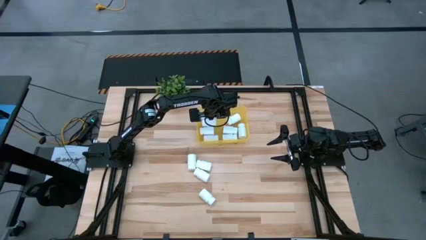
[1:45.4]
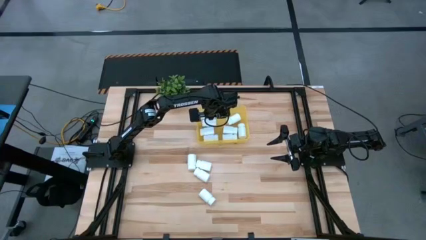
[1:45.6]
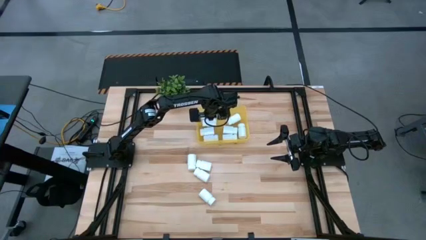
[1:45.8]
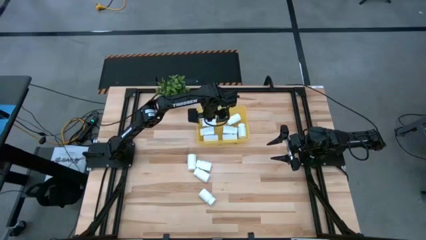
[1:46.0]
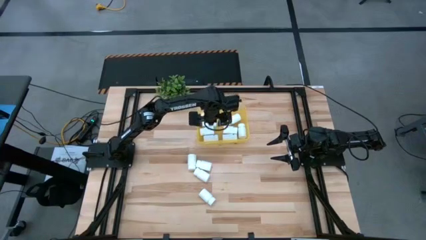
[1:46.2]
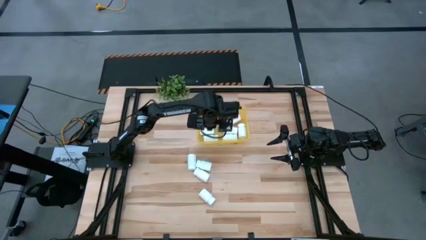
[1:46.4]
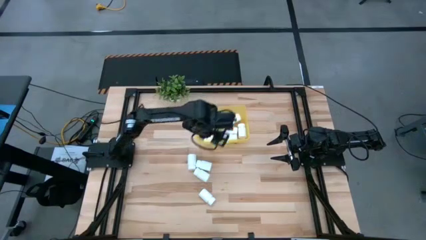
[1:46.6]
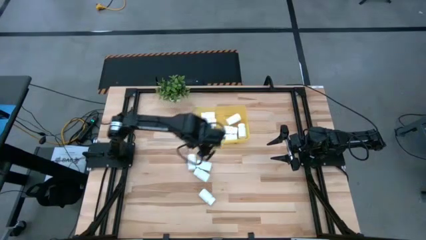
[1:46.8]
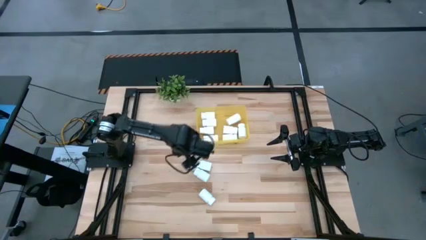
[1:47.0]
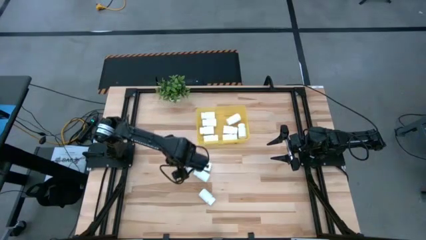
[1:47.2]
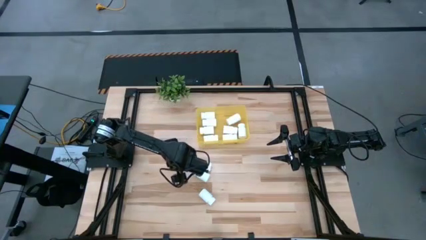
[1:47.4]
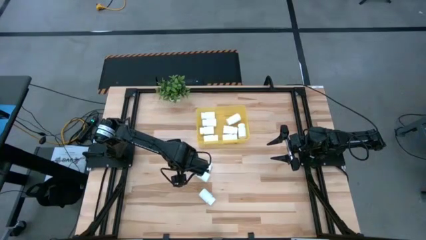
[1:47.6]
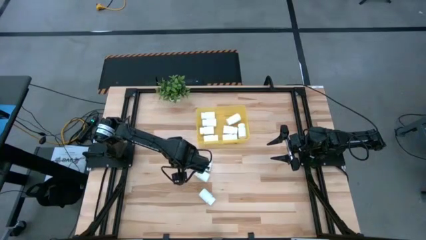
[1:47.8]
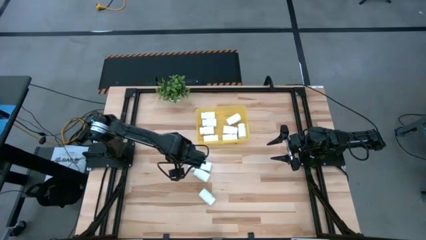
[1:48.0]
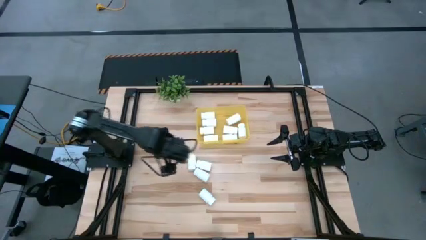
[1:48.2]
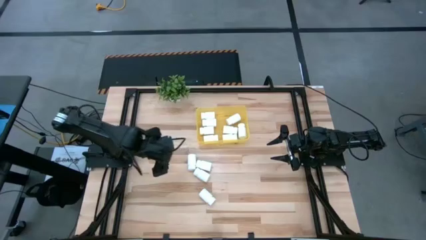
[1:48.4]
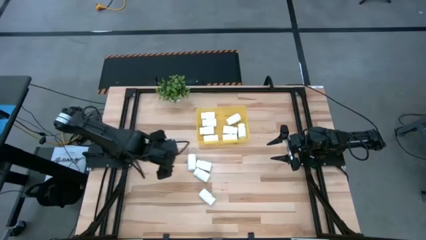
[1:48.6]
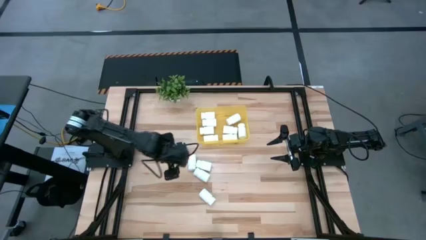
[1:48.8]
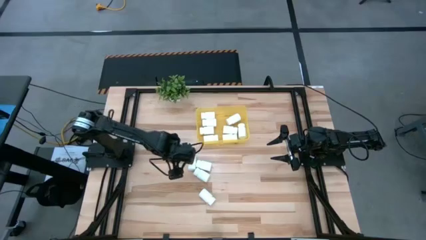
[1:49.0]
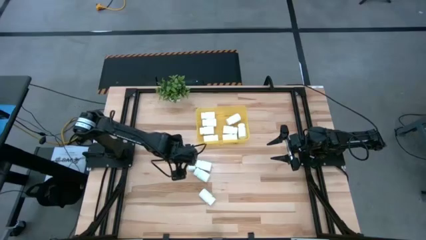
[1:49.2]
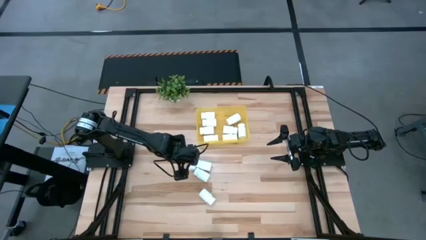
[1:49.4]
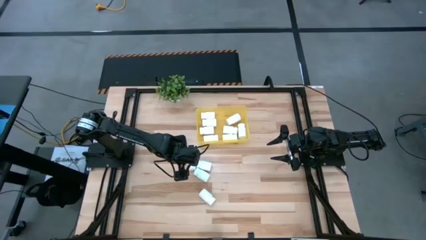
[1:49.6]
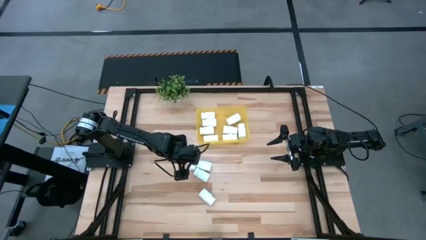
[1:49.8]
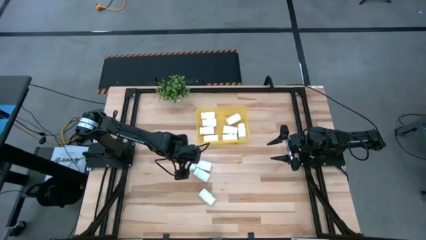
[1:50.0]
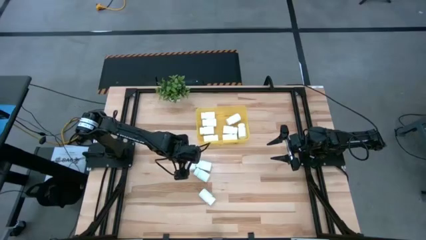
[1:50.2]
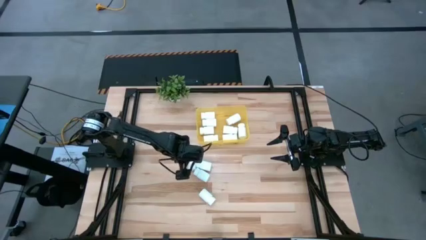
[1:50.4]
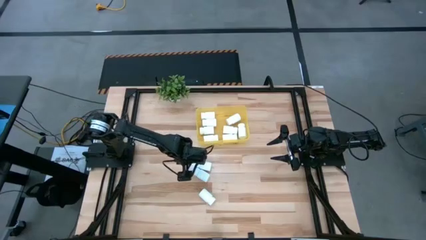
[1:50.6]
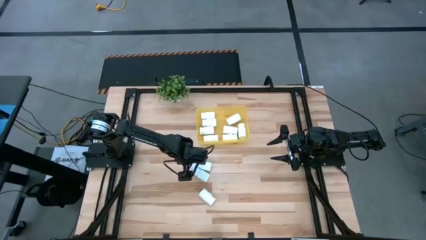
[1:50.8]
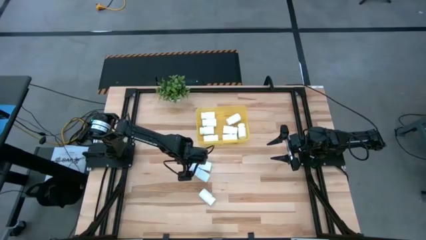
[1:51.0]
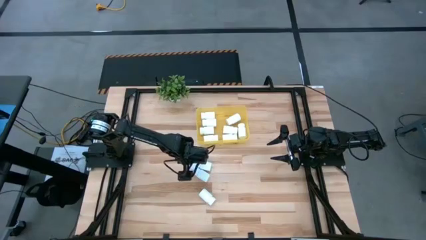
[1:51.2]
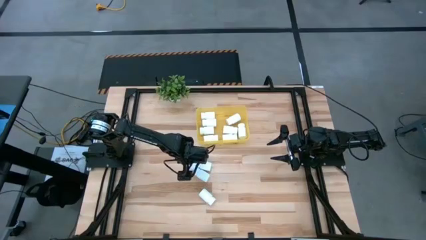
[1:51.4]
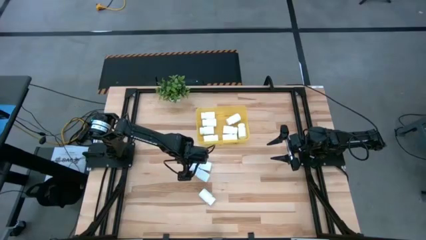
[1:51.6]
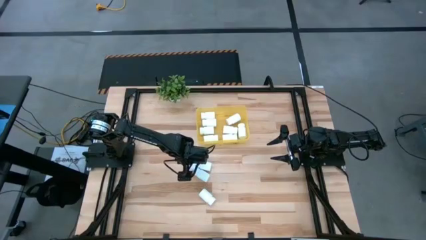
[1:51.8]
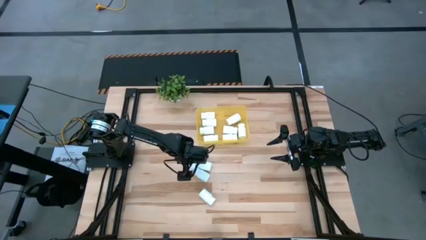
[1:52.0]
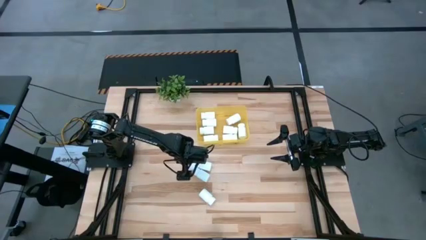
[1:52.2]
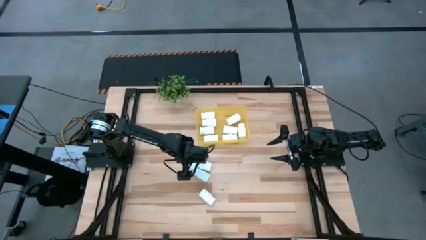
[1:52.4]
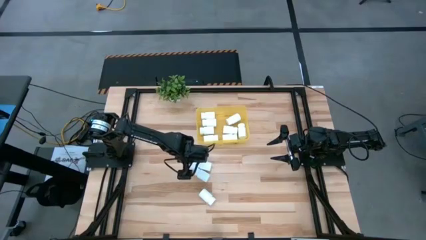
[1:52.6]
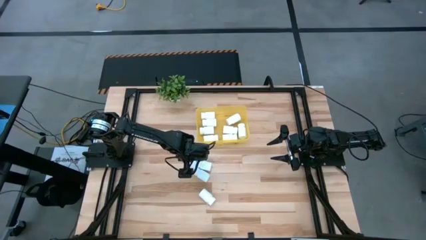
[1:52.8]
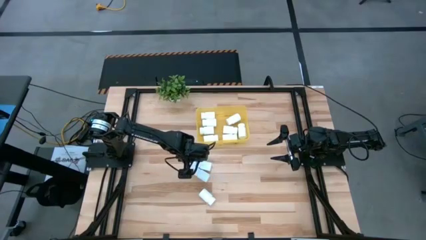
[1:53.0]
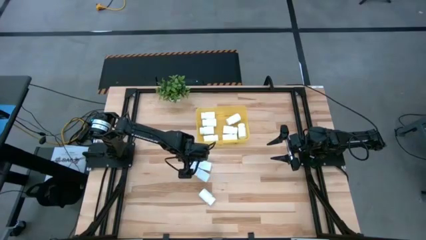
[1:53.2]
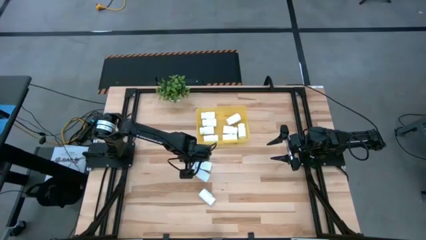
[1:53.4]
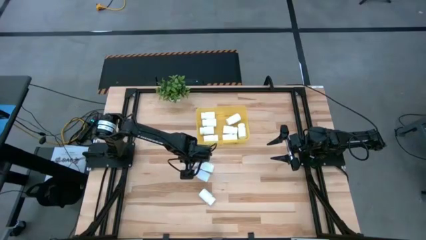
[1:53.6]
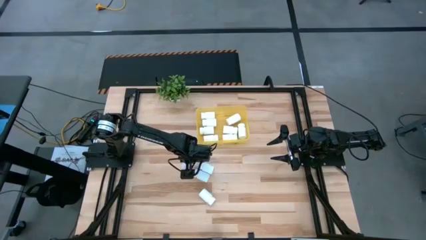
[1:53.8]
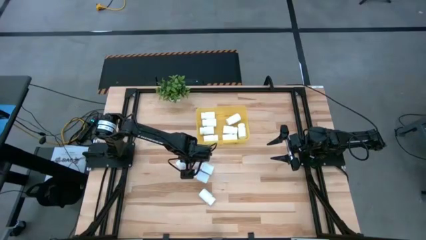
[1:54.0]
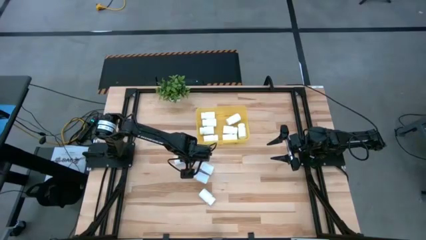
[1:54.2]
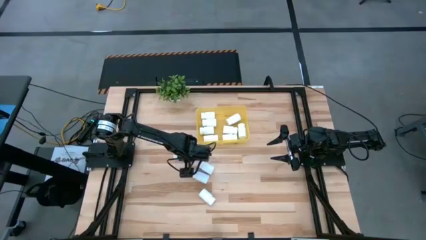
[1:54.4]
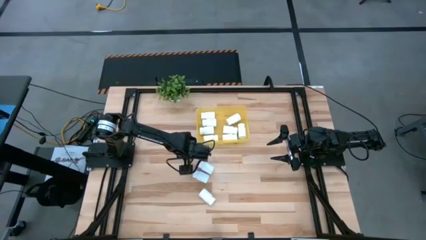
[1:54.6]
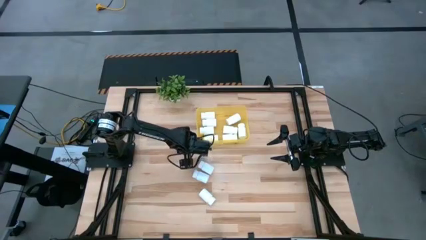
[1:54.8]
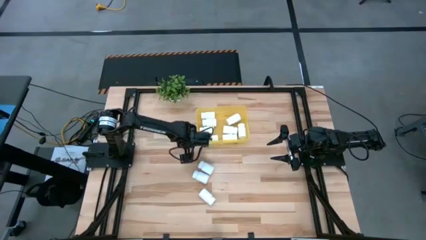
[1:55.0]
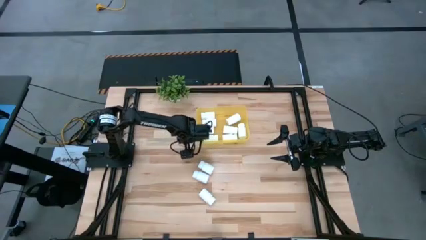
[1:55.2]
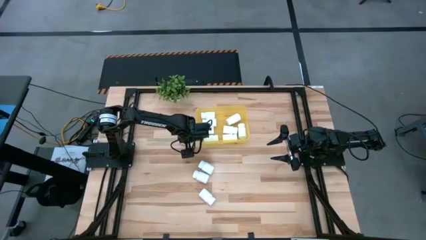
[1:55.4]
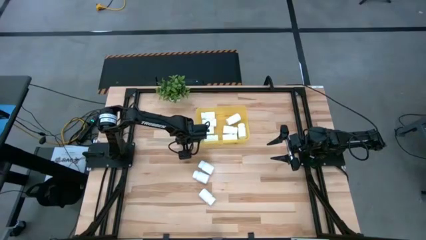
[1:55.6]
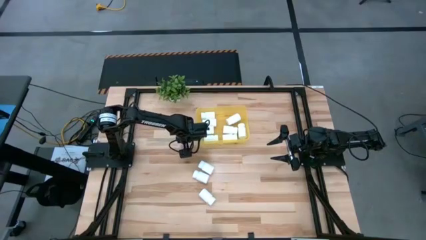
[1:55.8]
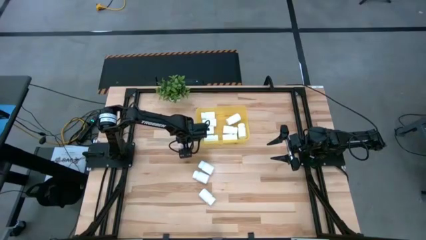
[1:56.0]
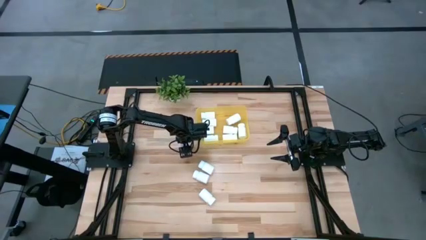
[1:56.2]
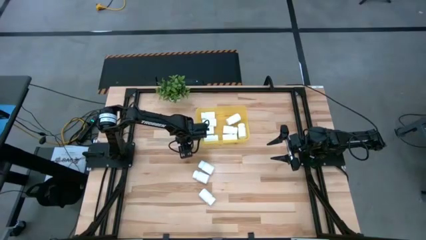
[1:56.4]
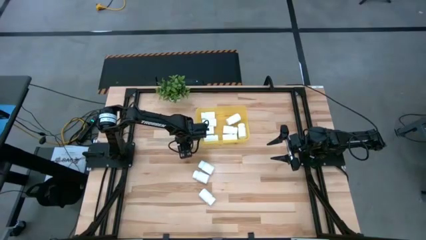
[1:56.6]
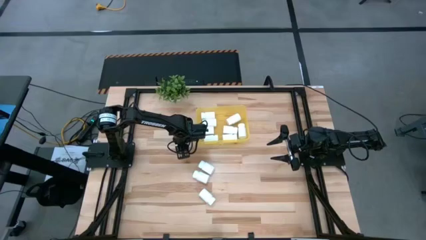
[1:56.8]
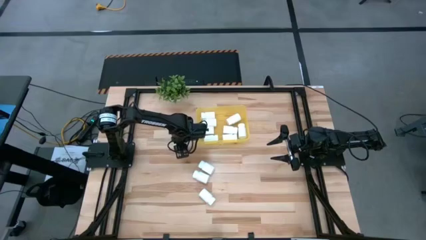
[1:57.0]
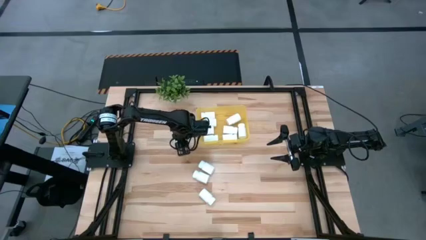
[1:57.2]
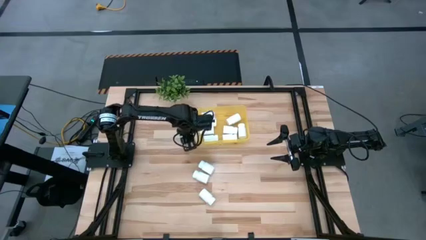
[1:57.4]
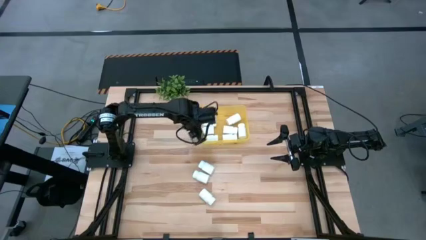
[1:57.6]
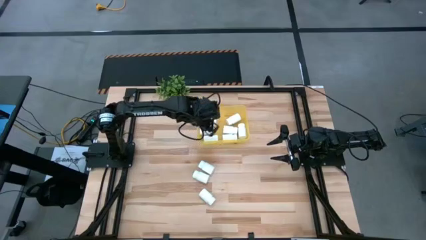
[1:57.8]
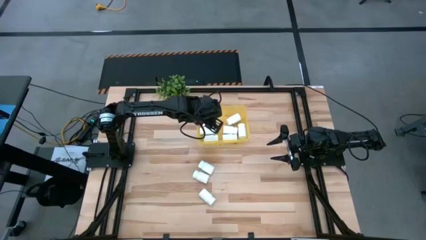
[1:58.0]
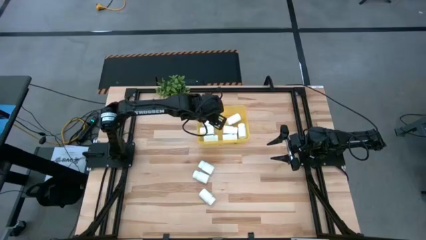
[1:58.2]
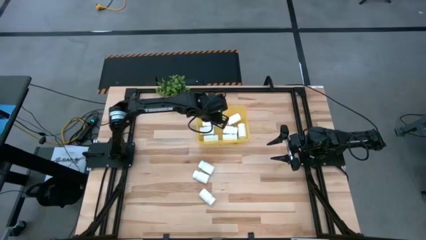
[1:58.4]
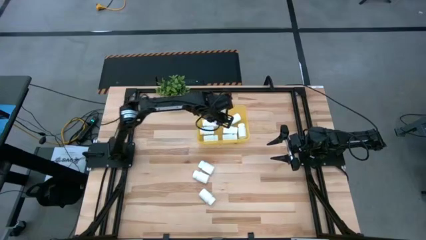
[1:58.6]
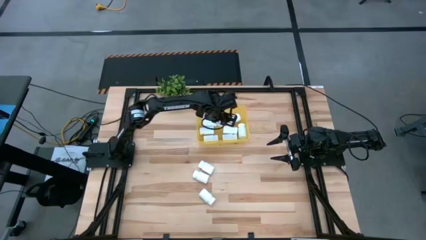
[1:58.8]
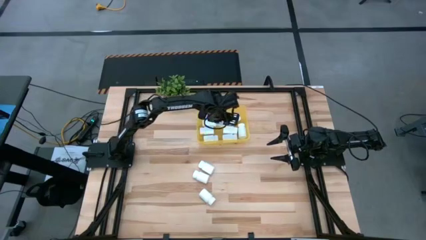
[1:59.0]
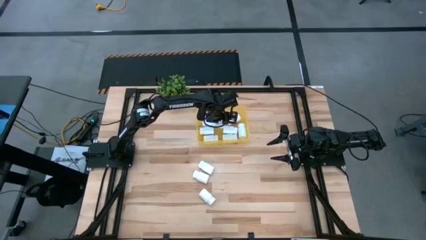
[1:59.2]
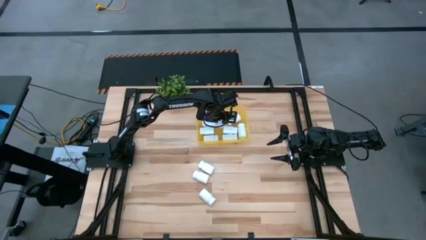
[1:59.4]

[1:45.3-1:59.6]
Task: Pick and place pill bottles into a basket
Put the white pill bottle into the yellow bin

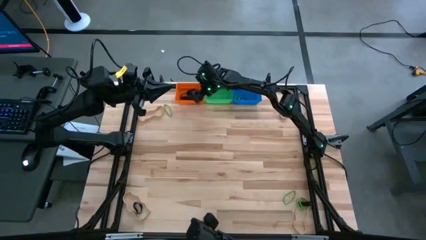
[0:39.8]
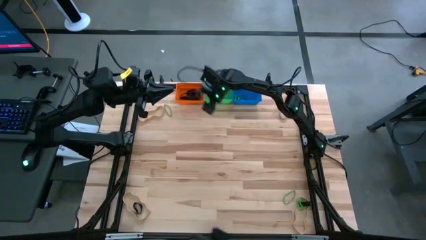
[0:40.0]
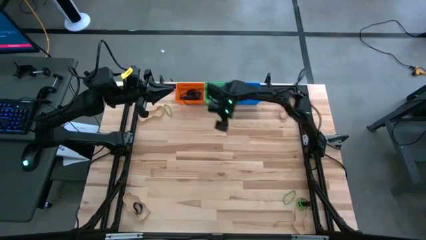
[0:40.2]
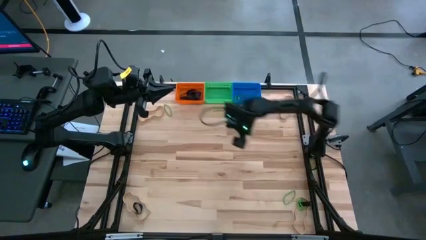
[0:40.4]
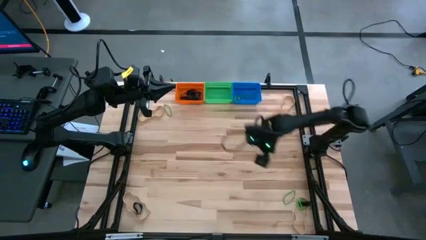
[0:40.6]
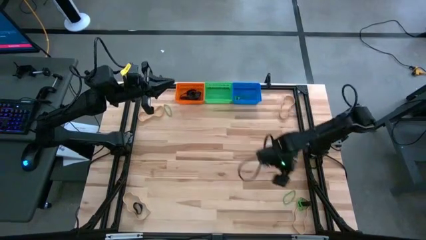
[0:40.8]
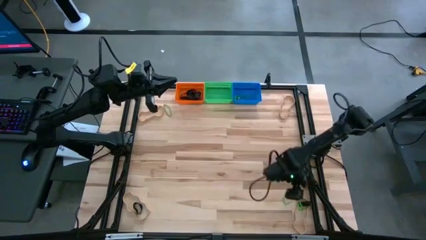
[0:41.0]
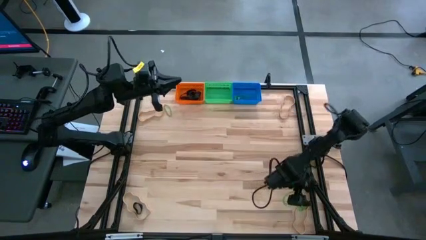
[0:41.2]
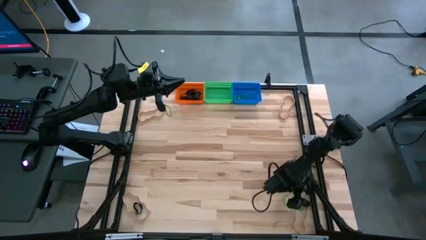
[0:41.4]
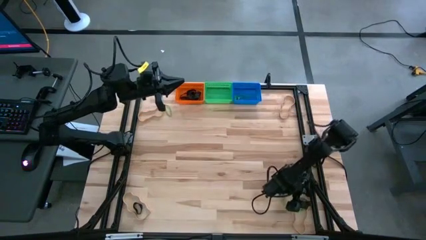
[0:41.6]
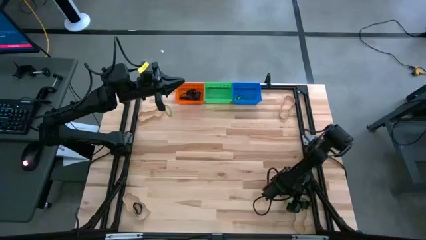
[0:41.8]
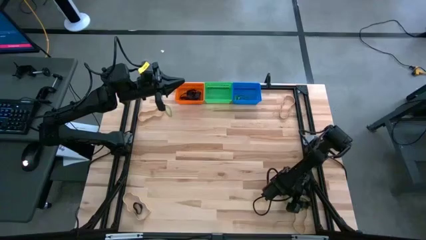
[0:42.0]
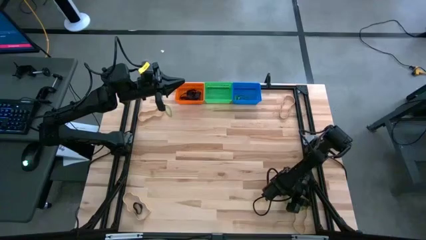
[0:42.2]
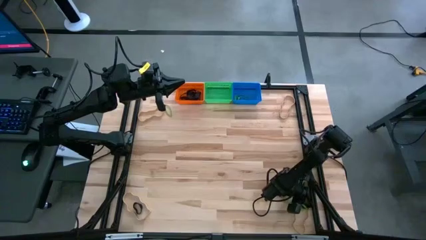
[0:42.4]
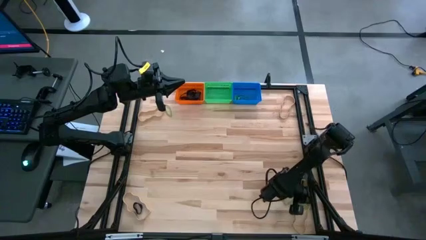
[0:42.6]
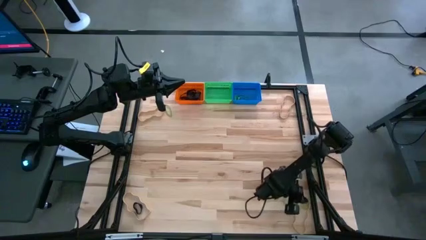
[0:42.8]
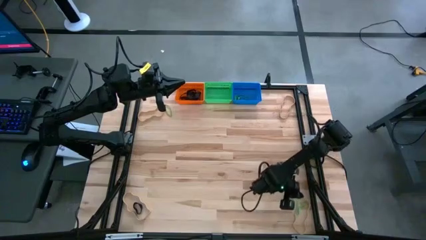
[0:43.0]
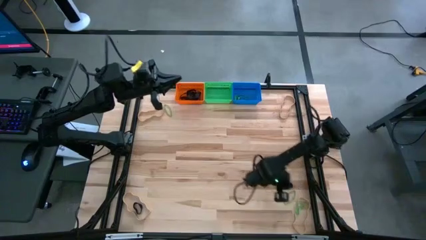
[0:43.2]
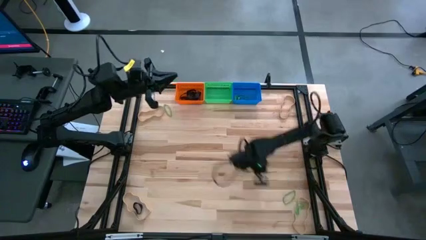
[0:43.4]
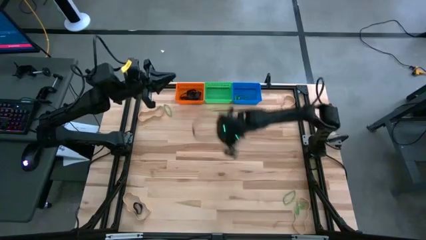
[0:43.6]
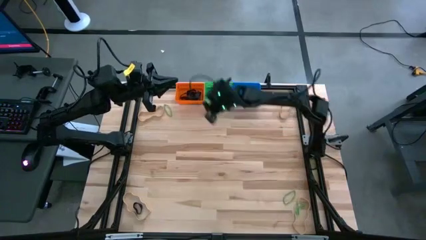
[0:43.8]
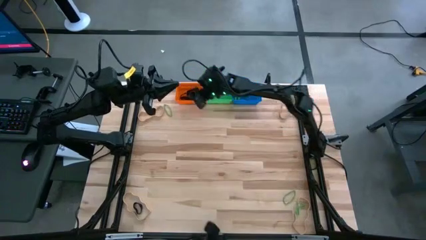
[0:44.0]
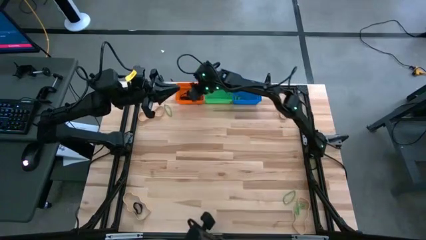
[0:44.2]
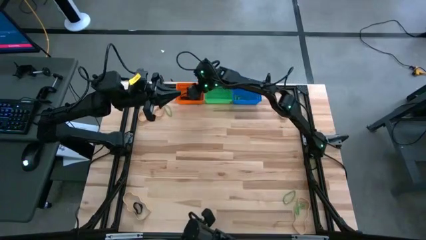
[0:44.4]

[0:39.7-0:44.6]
Task: Sort rubber bands into baskets
Put the black rubber band into the orange basket
